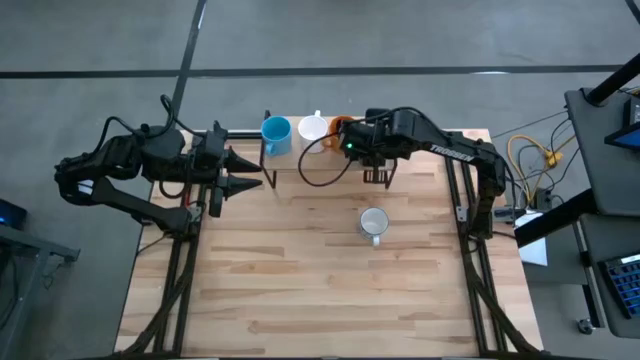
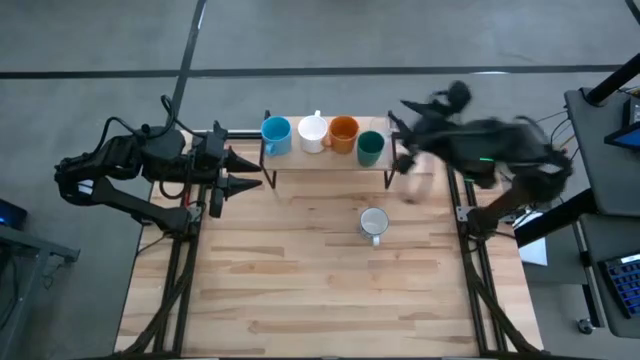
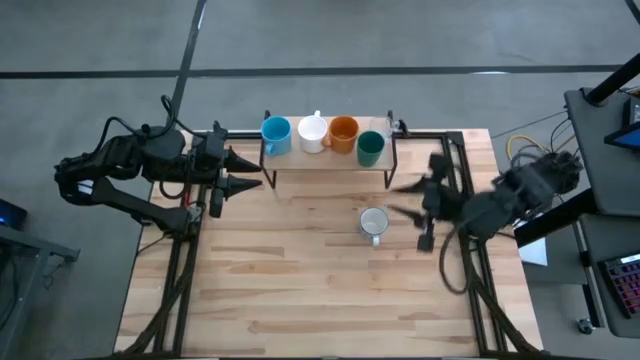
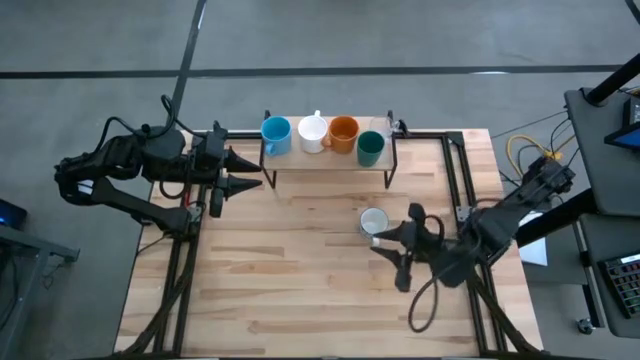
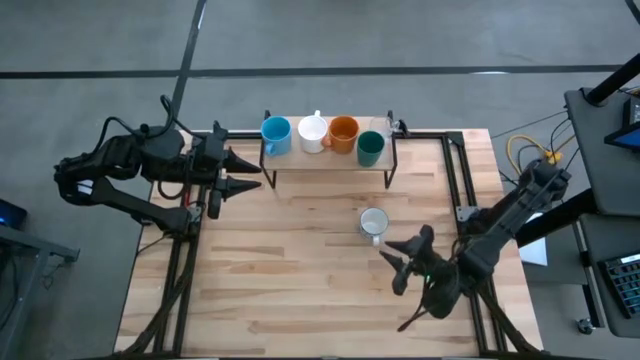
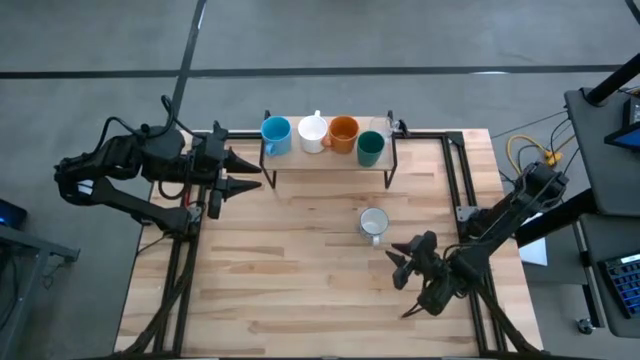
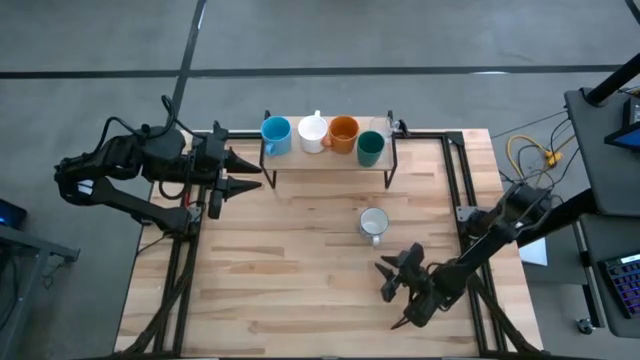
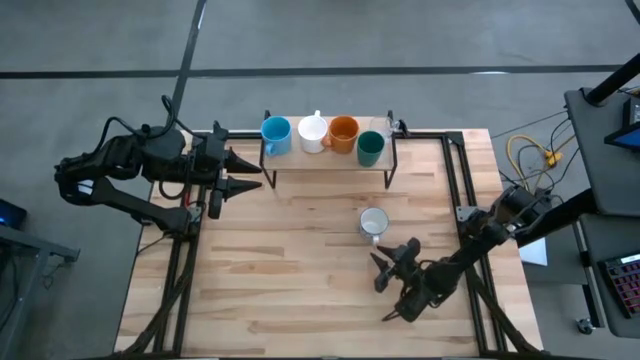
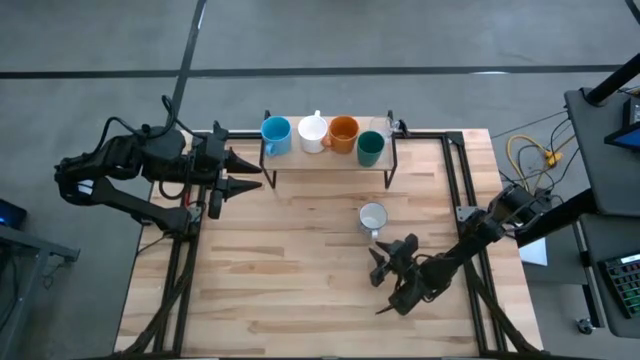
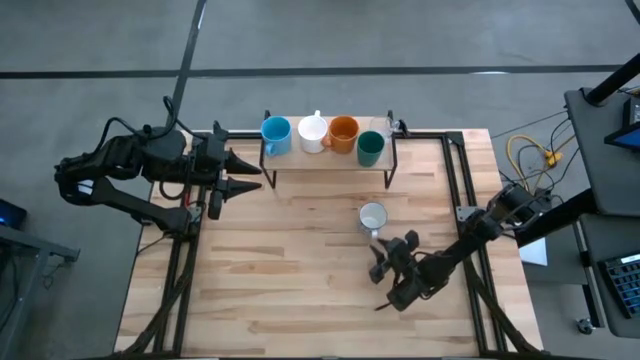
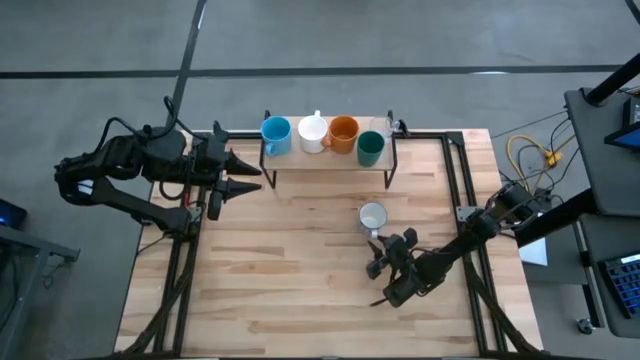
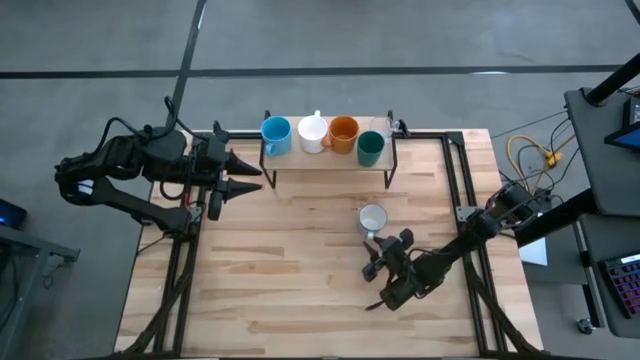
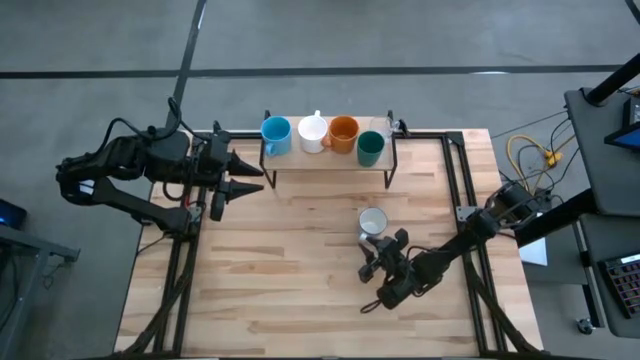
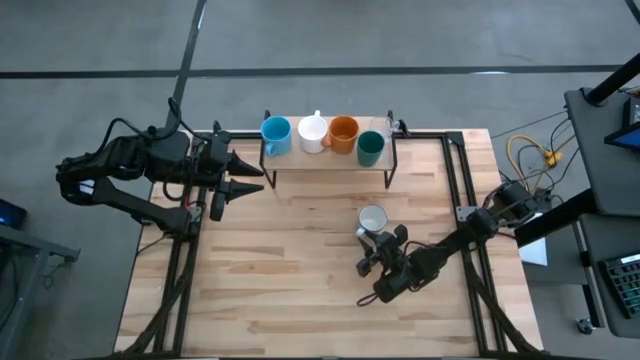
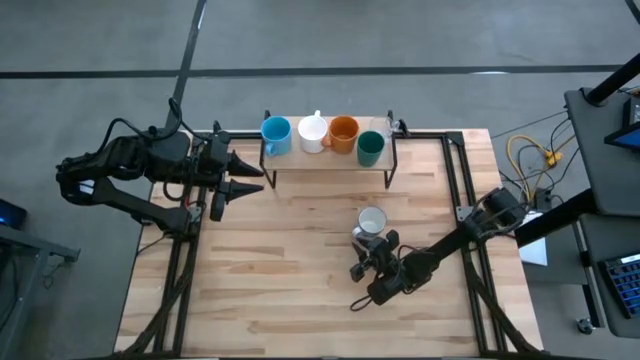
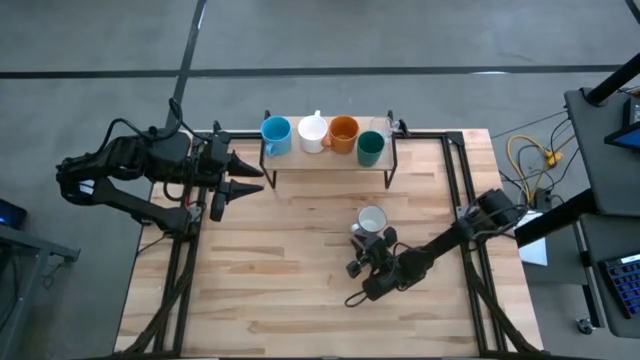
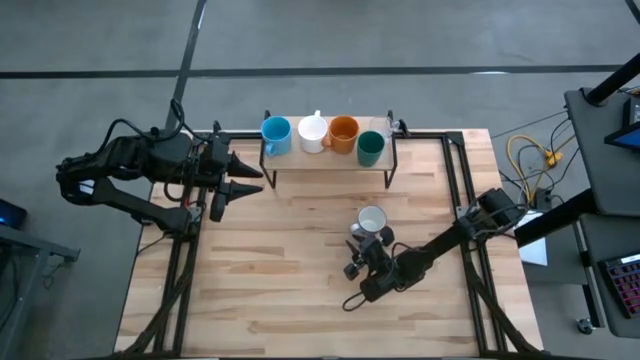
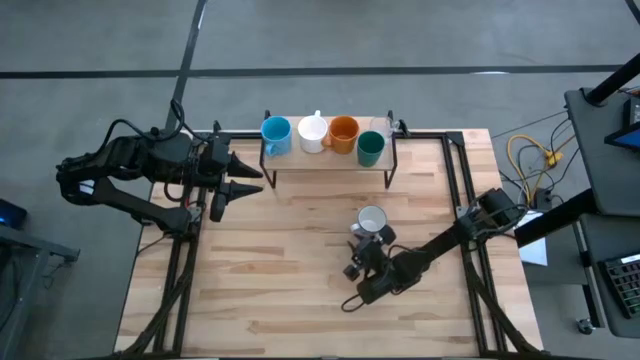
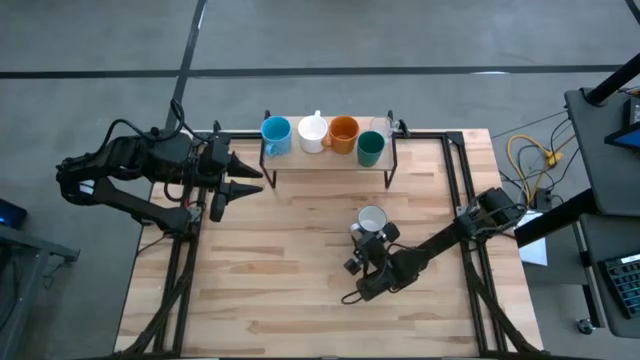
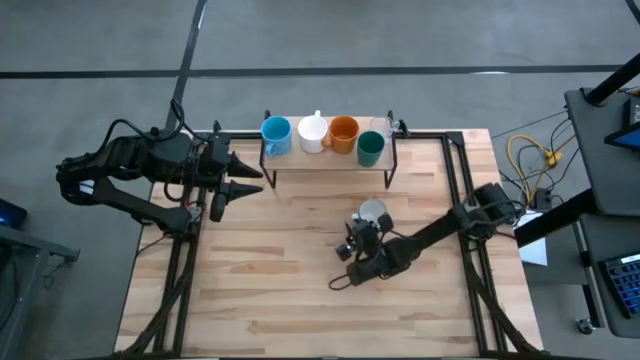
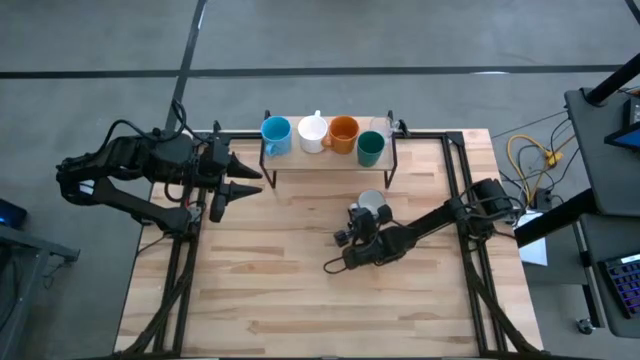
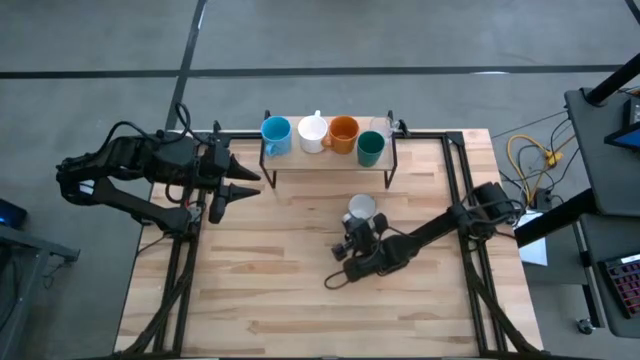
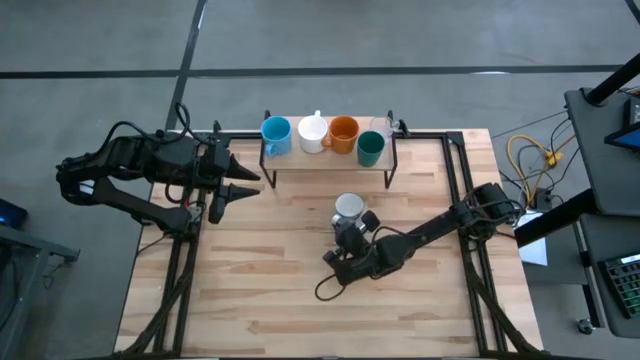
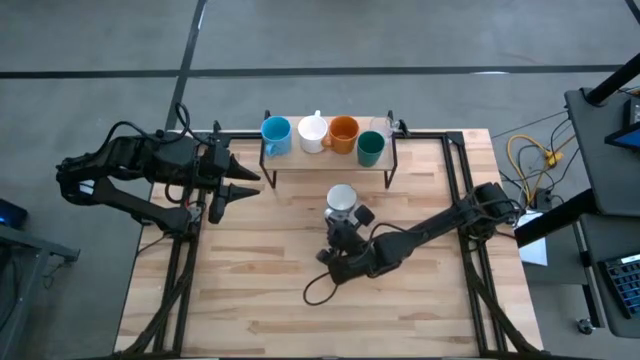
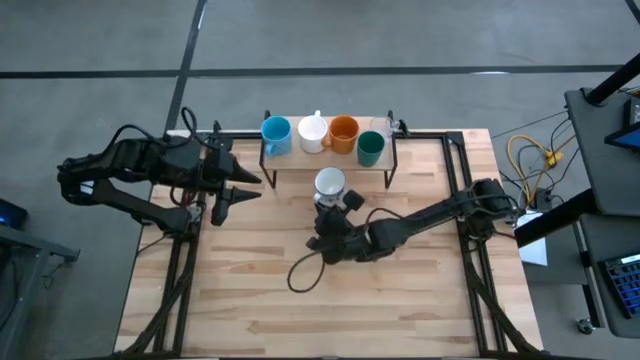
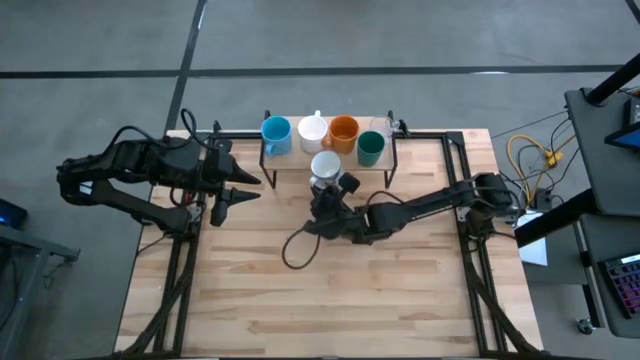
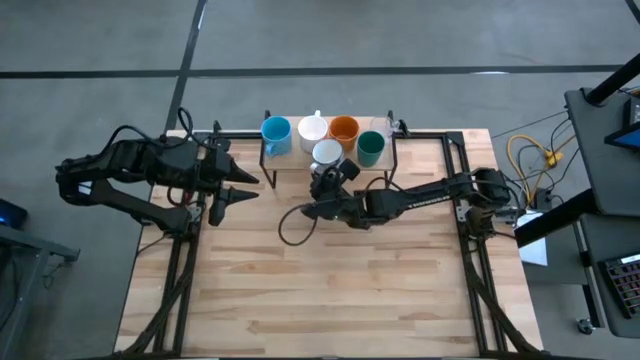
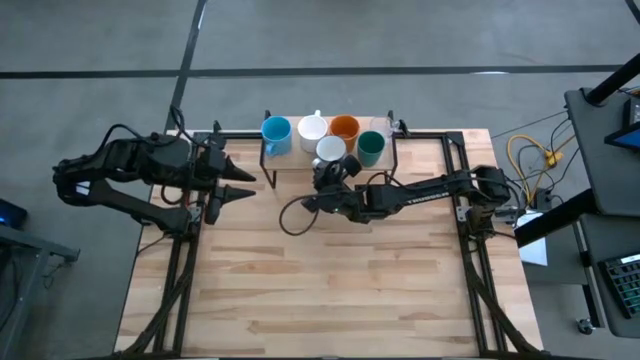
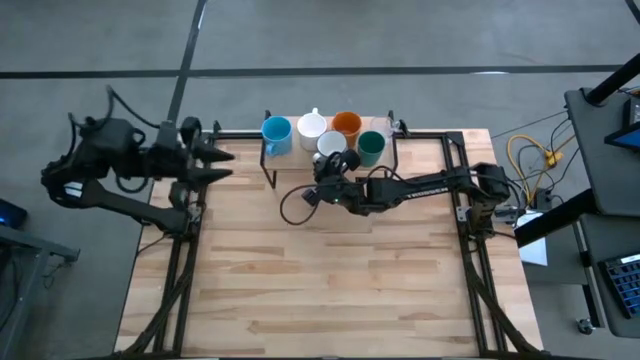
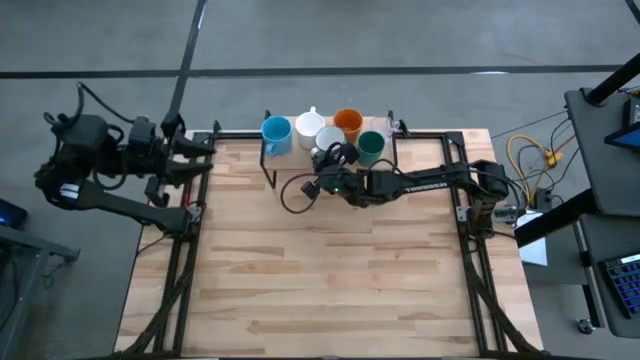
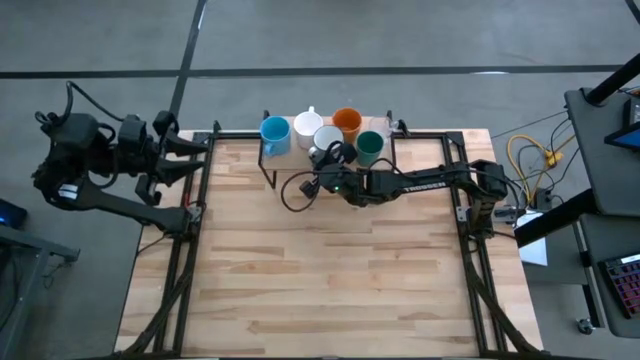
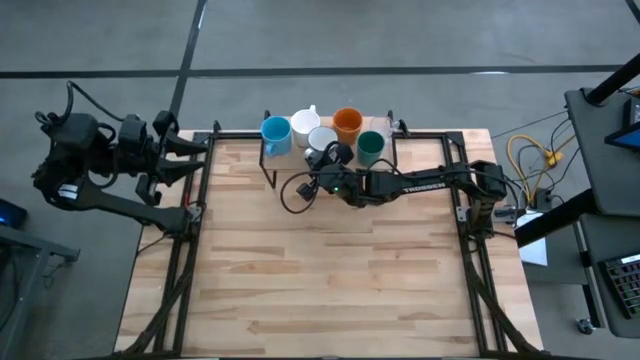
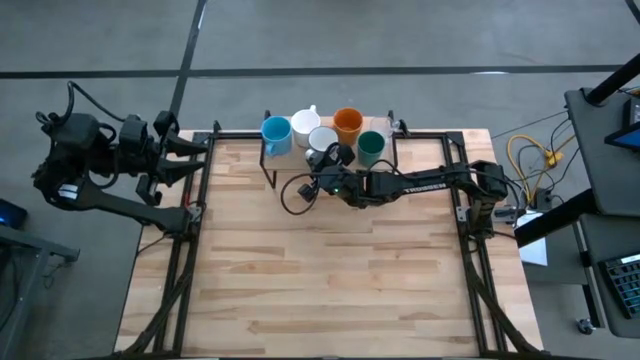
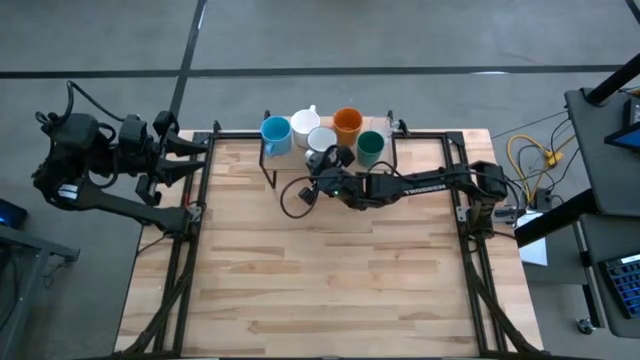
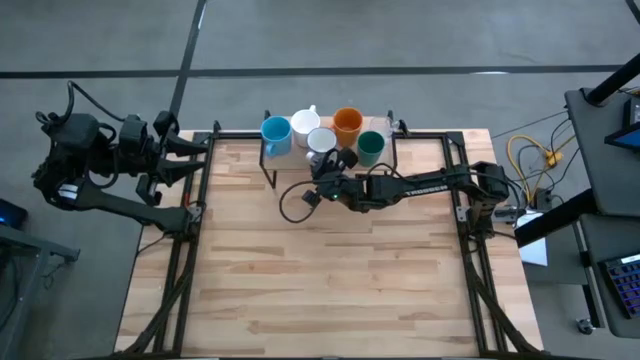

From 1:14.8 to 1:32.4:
Task: Stack small to large cups/mugs on shelf
Put the white patterned mug on the shelf
